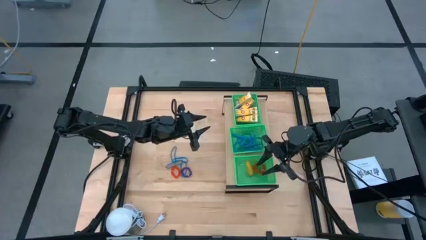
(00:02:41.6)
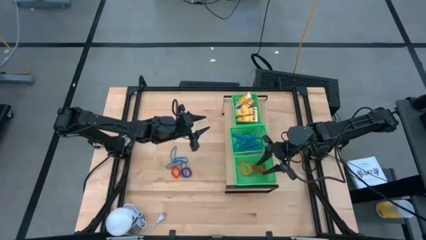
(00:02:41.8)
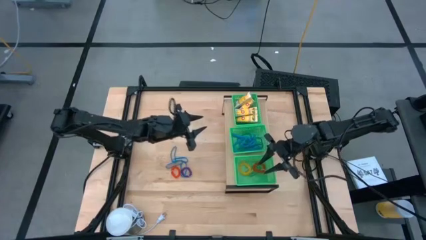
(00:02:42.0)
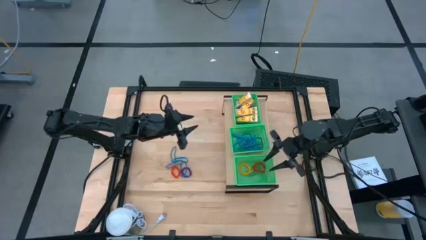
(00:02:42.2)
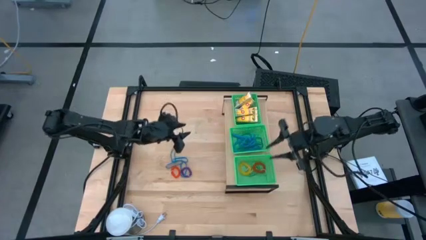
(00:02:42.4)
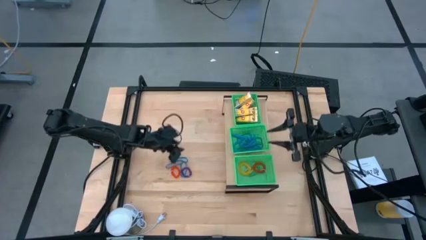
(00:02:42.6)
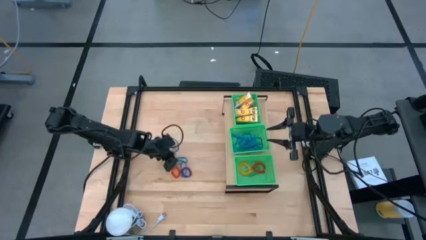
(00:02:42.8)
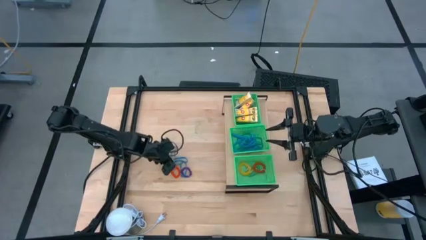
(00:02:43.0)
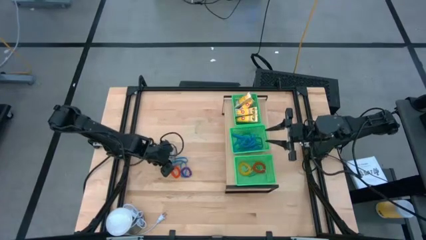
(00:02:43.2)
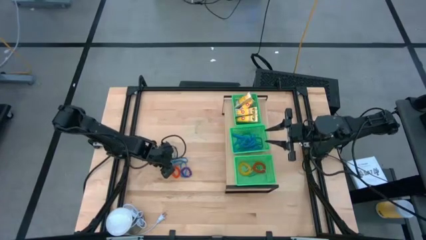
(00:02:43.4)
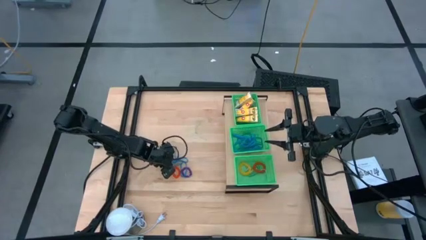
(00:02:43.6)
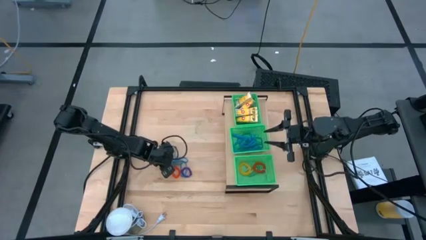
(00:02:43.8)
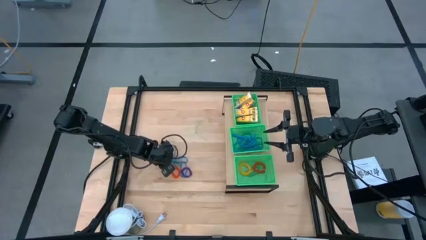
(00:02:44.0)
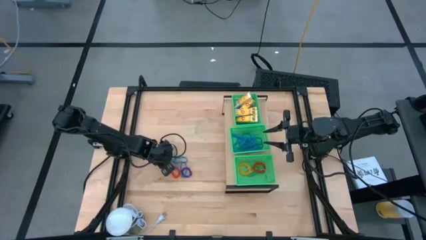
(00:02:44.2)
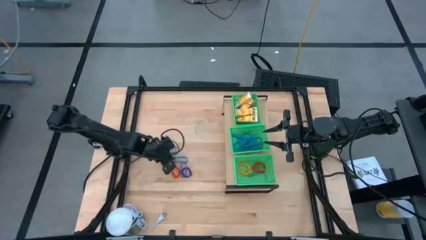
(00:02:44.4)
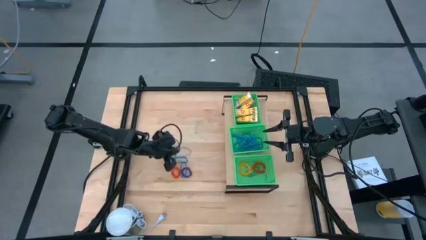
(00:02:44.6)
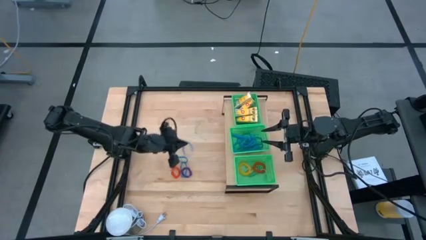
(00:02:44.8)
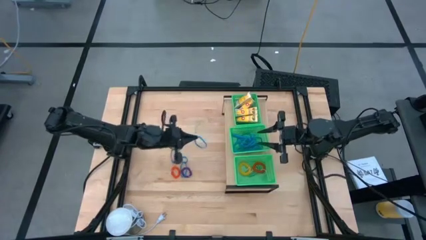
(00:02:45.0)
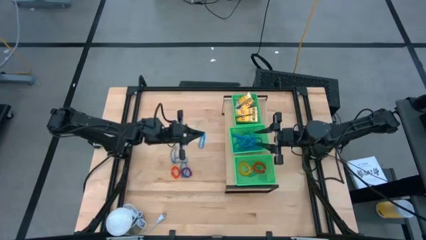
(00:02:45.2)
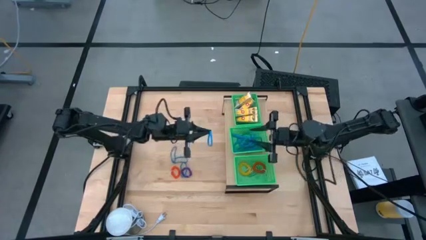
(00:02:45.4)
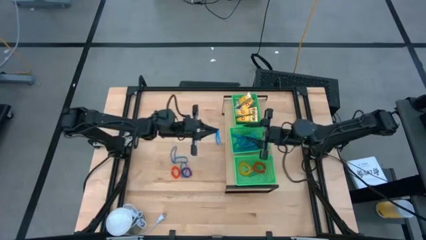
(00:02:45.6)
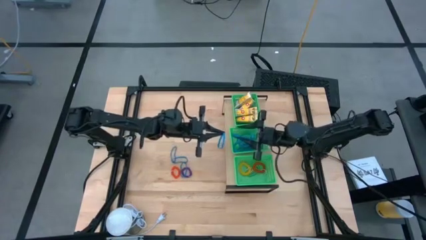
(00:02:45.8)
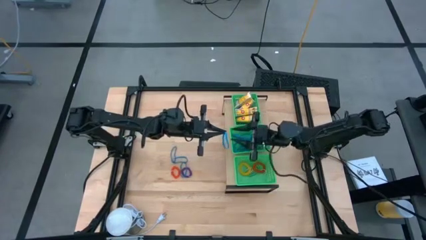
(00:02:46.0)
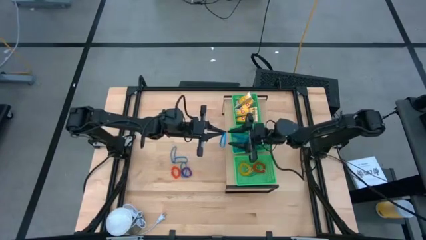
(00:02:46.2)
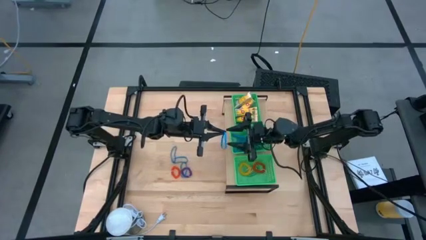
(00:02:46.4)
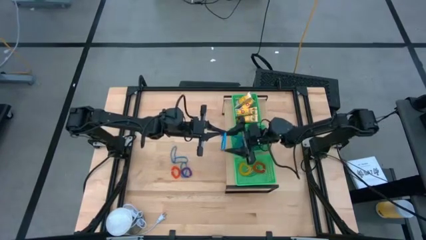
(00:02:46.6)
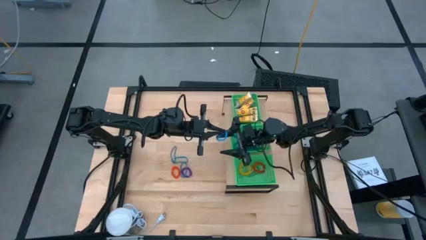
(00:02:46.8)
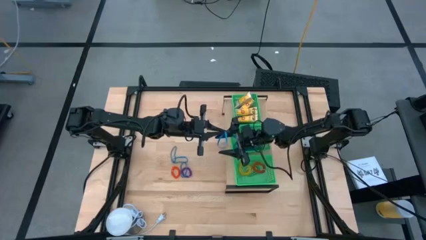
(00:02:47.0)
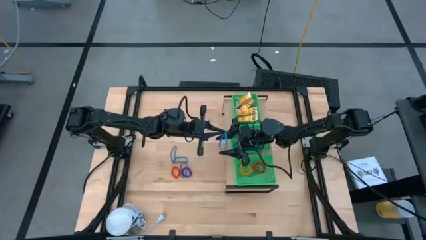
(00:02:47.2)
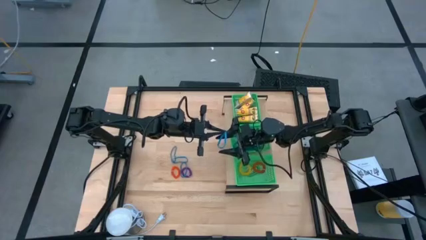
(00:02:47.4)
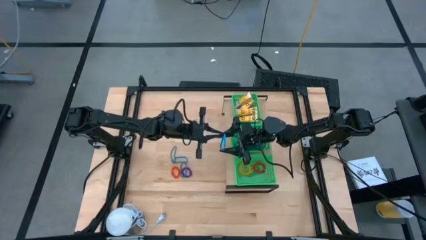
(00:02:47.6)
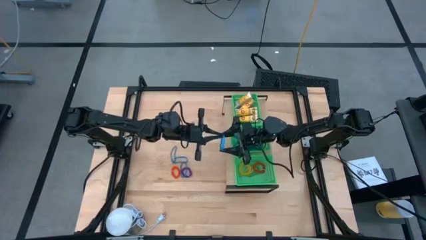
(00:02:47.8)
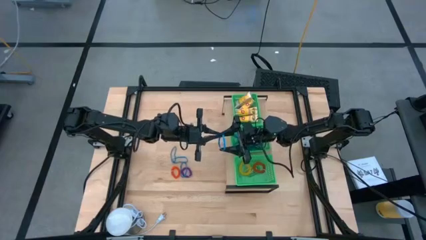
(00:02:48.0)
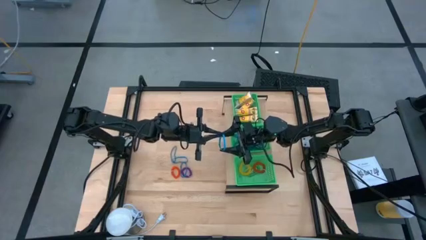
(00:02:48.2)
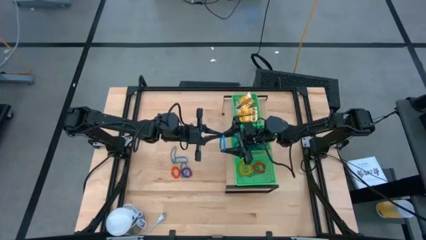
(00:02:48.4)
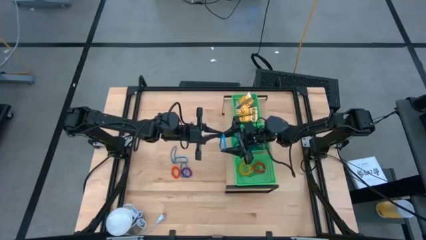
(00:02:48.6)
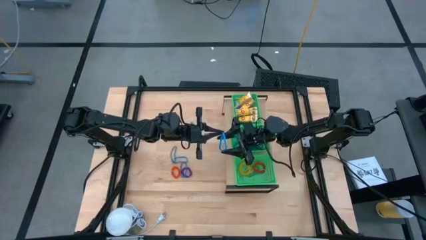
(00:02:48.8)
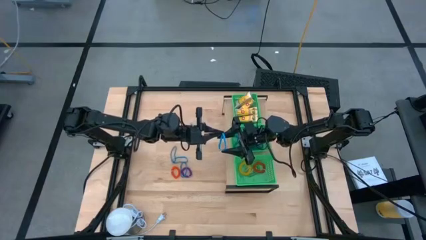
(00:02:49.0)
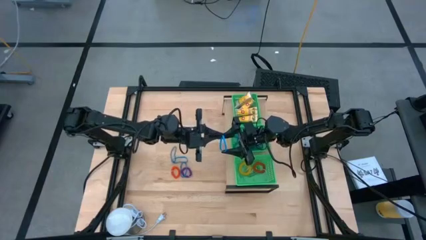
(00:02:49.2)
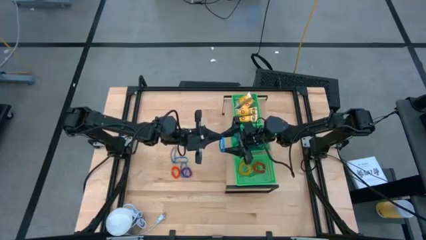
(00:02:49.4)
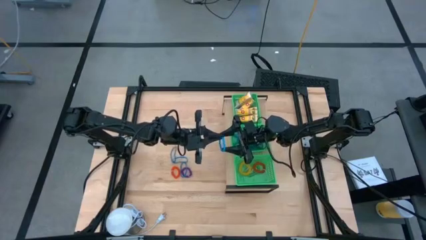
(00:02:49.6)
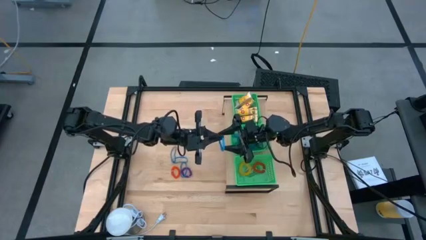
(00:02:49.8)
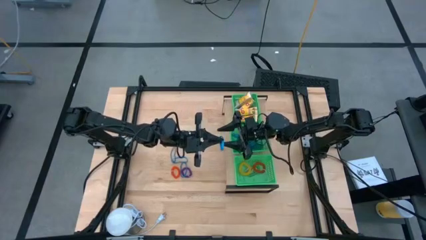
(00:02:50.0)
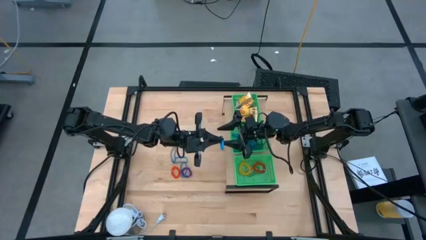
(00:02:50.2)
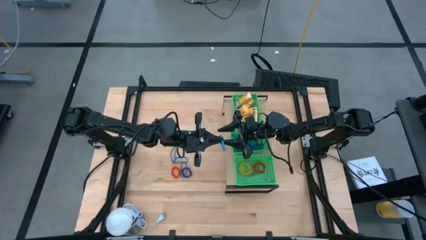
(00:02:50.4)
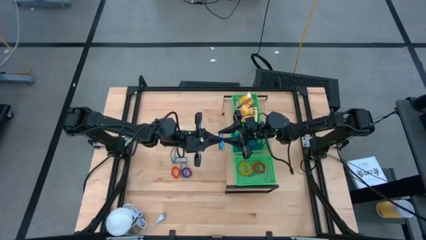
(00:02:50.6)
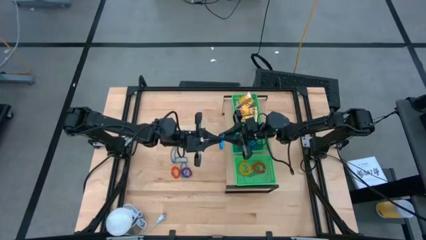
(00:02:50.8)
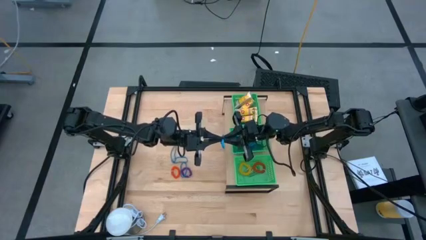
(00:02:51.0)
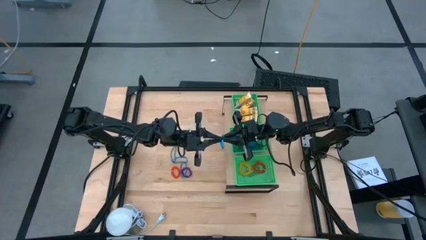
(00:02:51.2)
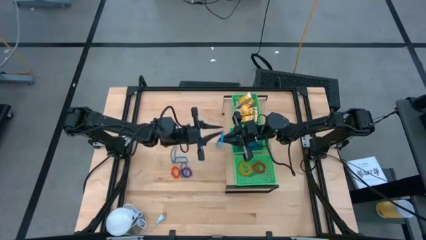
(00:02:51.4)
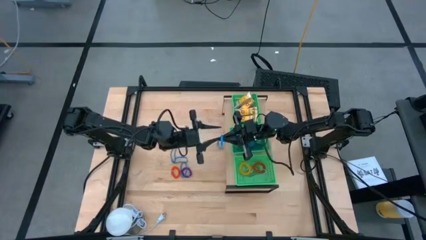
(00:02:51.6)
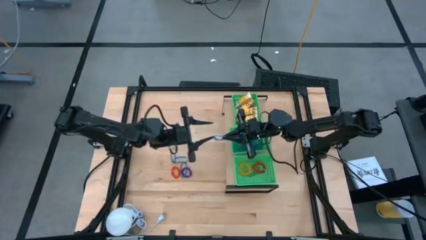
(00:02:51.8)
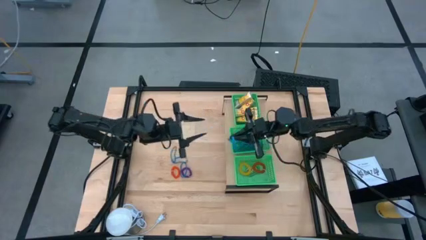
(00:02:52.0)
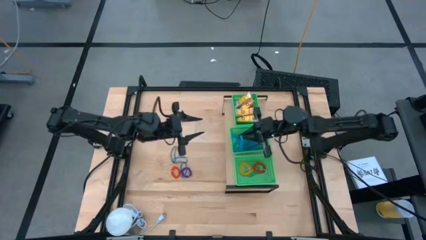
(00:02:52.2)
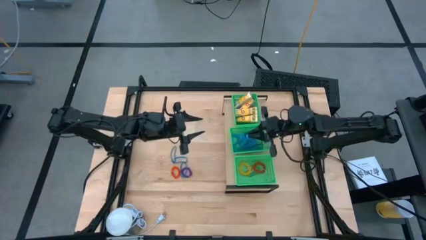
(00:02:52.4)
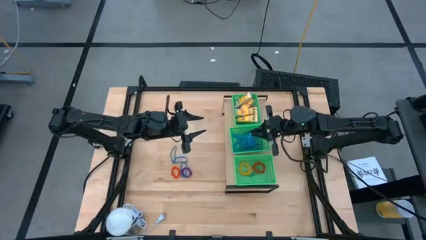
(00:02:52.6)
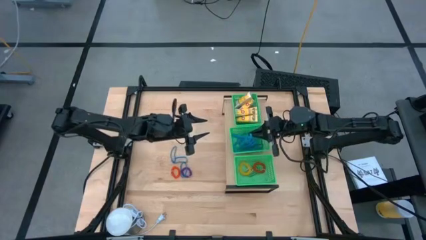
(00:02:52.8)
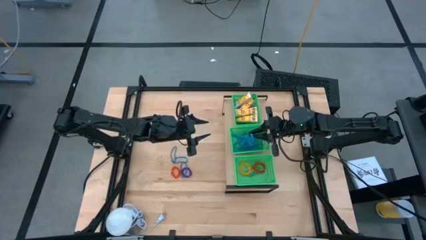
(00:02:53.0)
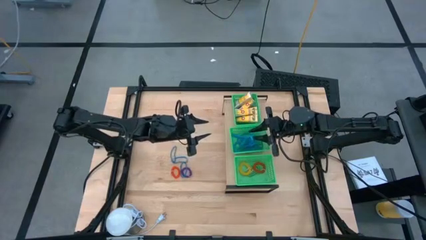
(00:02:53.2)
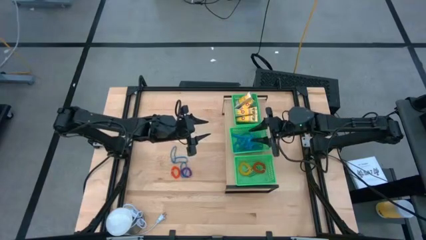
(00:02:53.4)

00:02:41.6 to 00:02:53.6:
Task: Pick & Place Office Desk Supplies
Put the blue rubber band into the middle green bin

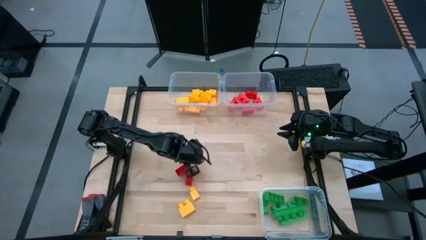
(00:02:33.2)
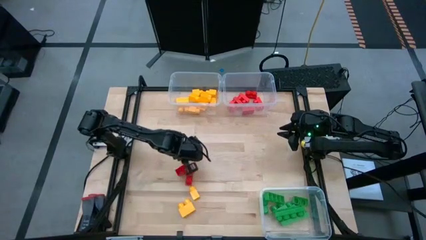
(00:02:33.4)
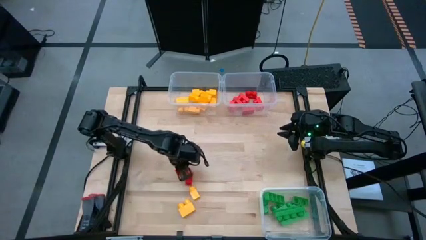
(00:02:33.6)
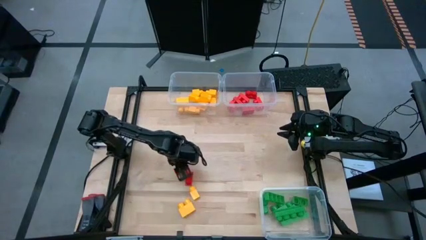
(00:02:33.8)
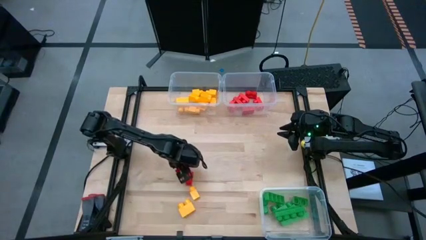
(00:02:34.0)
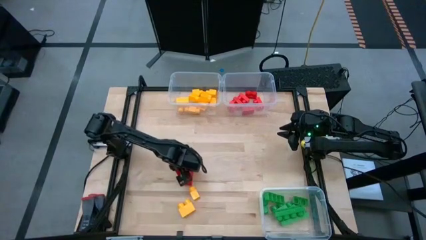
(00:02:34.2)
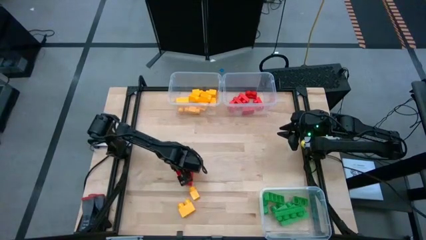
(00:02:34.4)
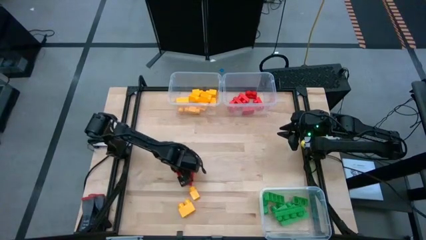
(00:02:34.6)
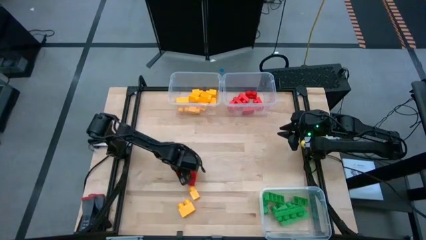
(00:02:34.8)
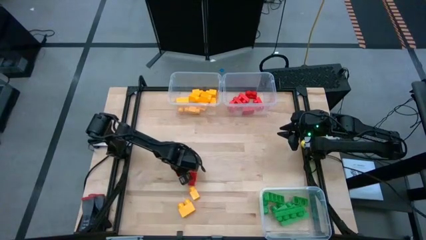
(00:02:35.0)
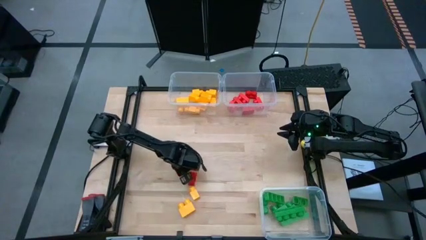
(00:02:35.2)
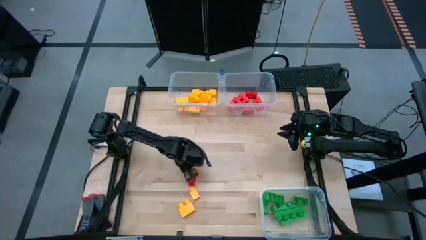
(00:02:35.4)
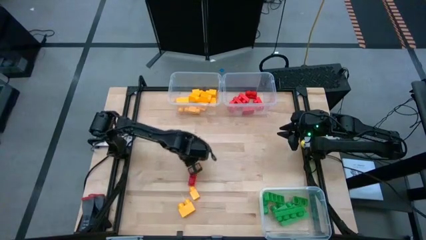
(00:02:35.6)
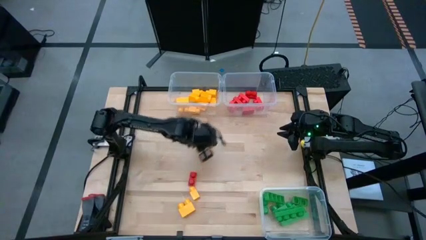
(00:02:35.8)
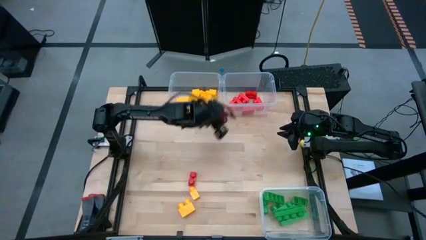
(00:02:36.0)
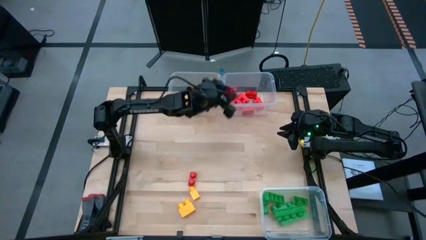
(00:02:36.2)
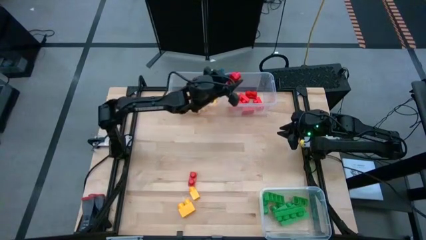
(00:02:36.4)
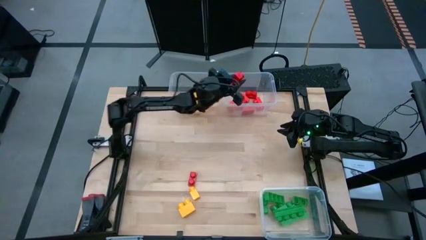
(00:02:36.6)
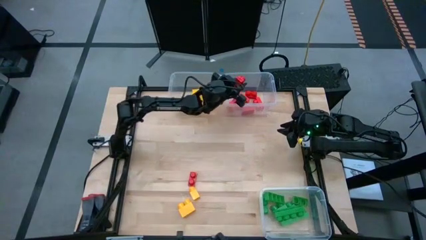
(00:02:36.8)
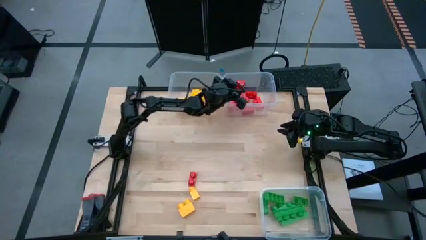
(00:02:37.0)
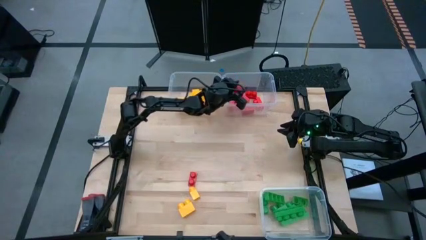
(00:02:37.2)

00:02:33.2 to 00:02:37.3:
Task: Sort blocks
Put the red game piece into the right transparent bin
